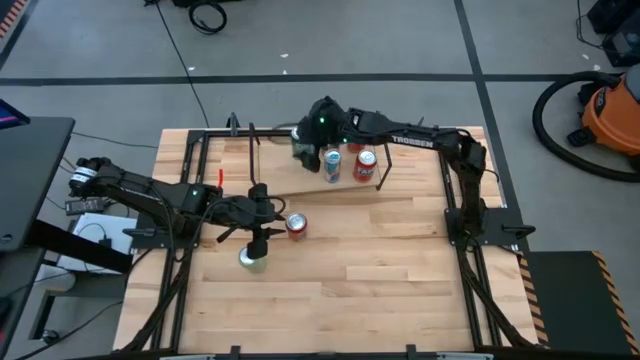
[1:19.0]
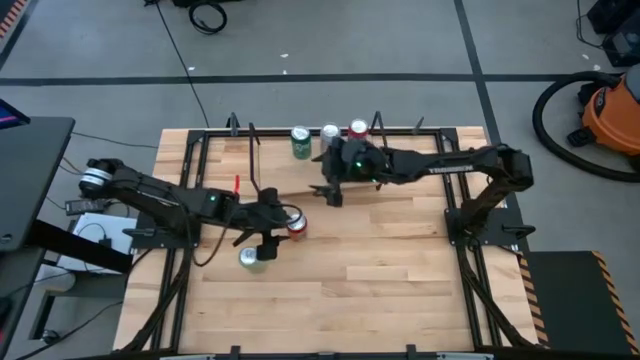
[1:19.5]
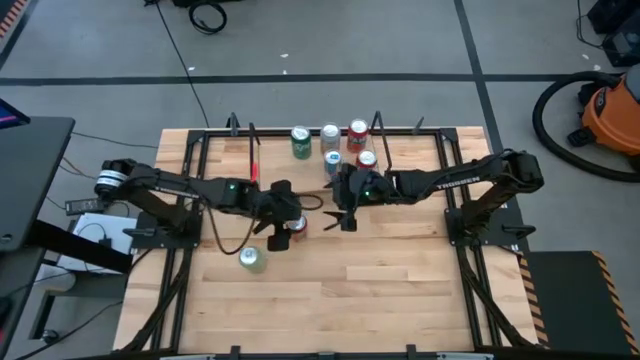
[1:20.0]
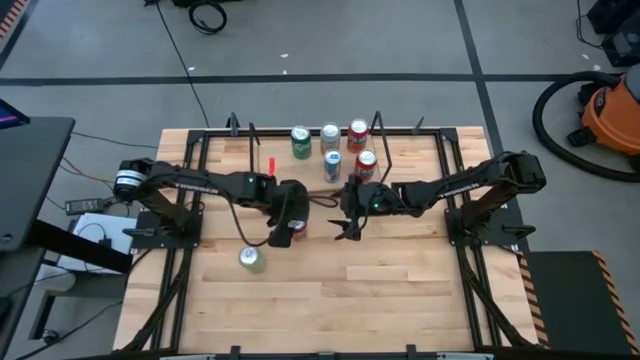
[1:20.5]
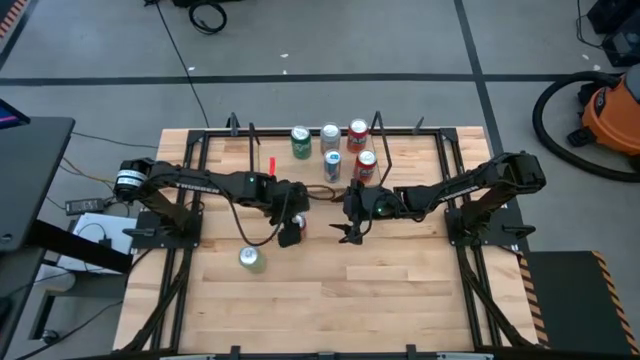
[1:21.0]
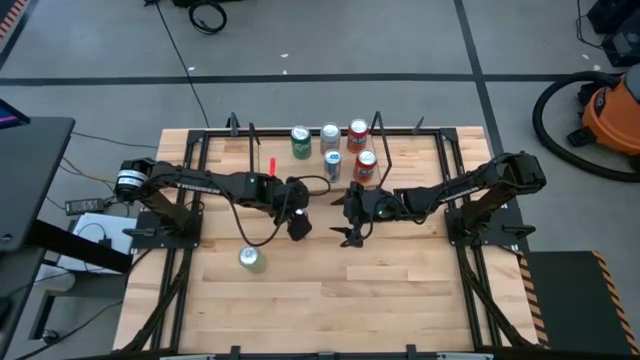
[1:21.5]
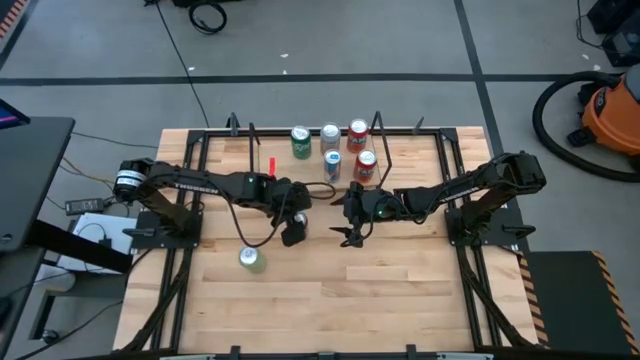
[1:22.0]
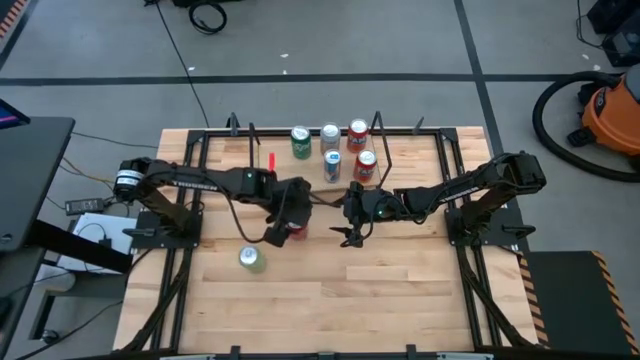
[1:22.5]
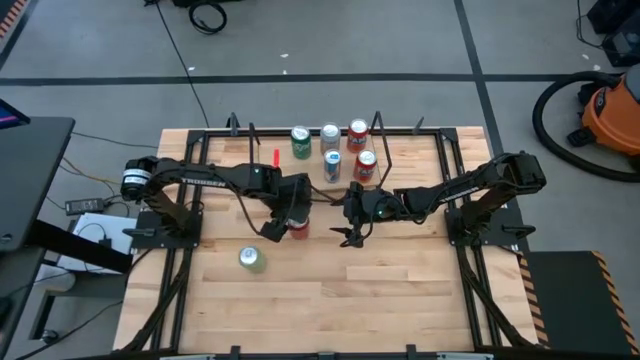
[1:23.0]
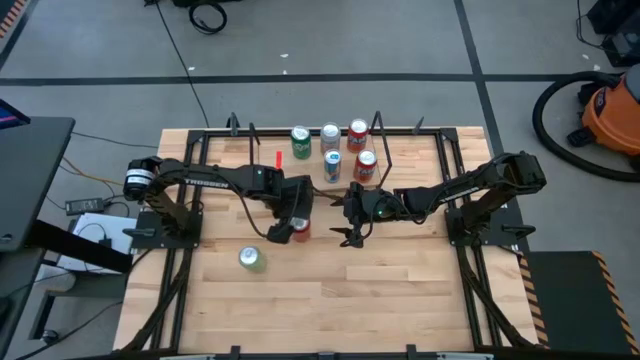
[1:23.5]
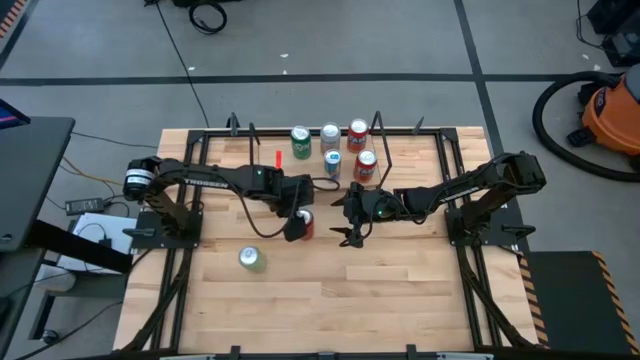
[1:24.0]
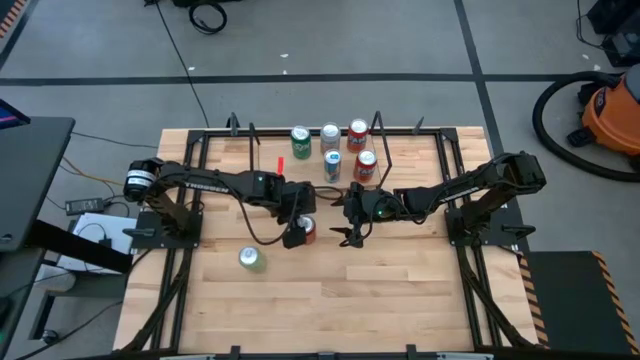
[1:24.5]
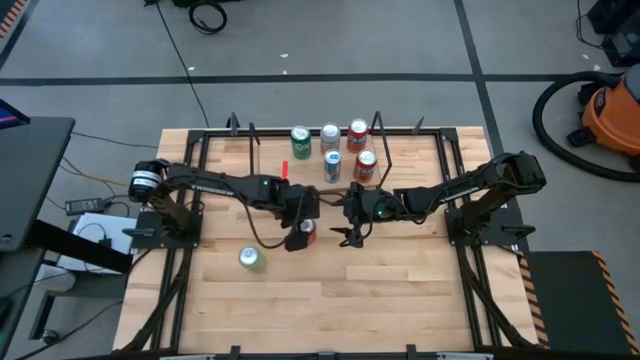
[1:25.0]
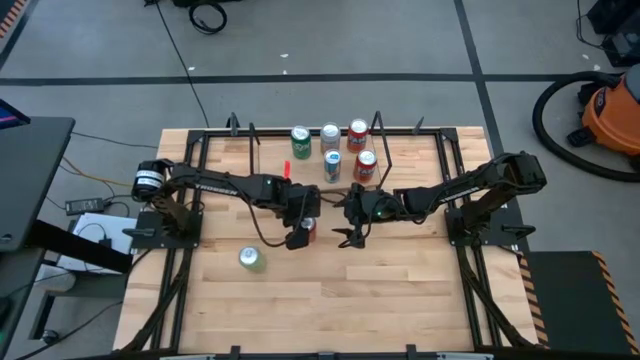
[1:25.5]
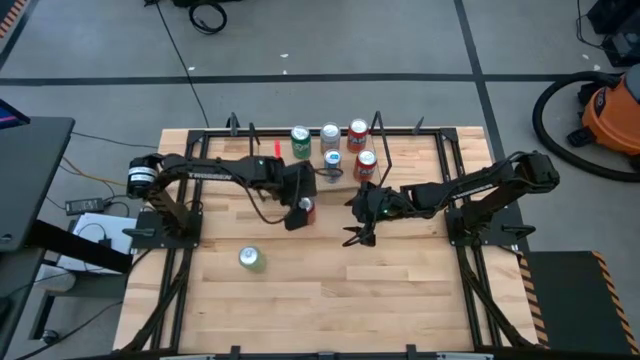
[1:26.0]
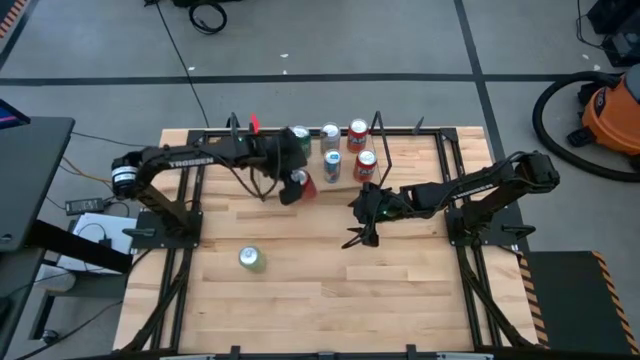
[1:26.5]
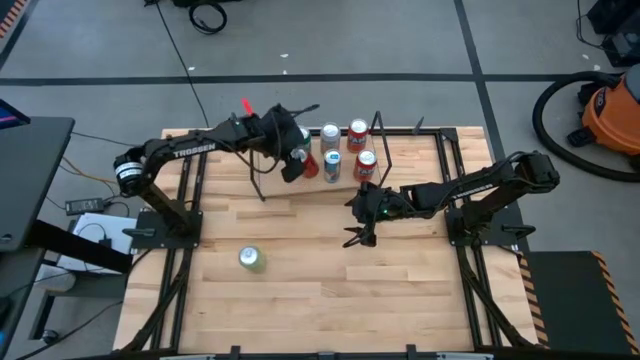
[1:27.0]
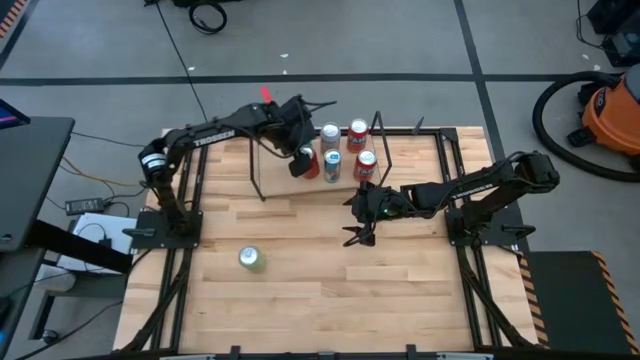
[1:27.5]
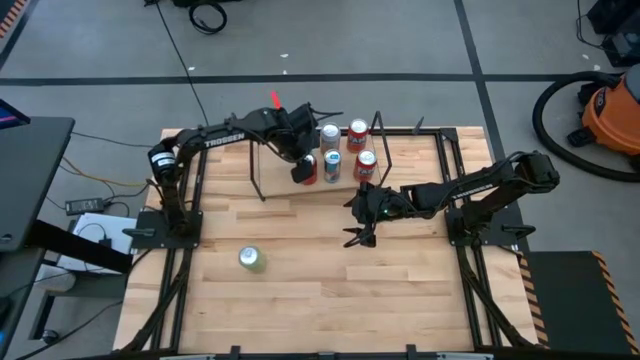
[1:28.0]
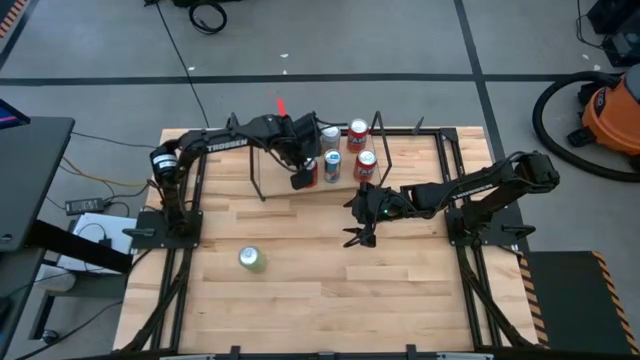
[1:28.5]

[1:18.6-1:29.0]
Task: Place canned beverage on shelf
Put the red-black soda can on the shelf aligned with the green soda can

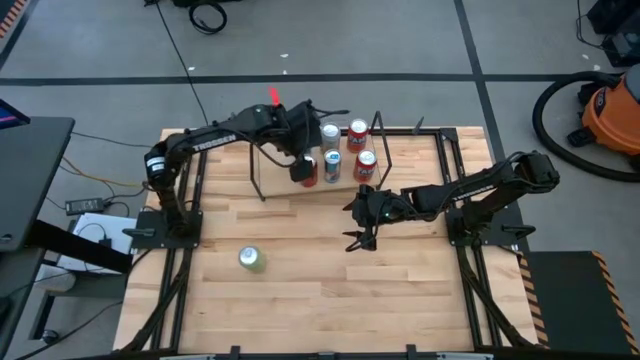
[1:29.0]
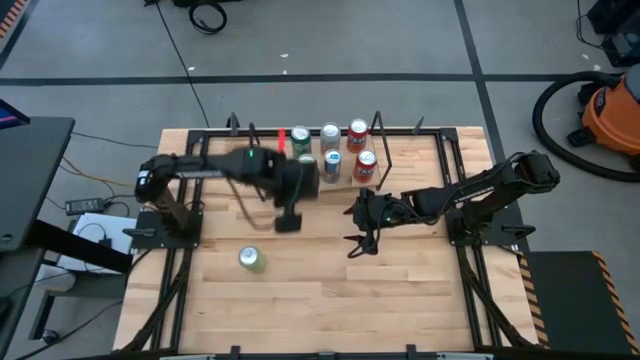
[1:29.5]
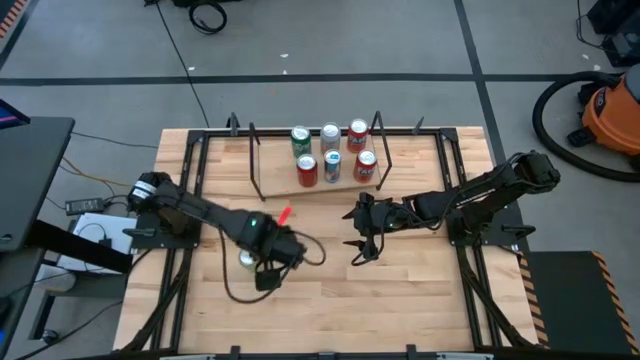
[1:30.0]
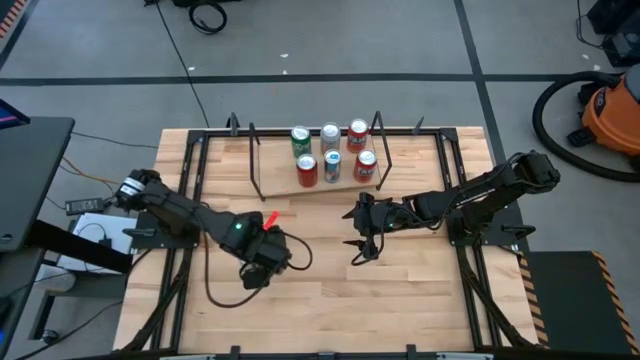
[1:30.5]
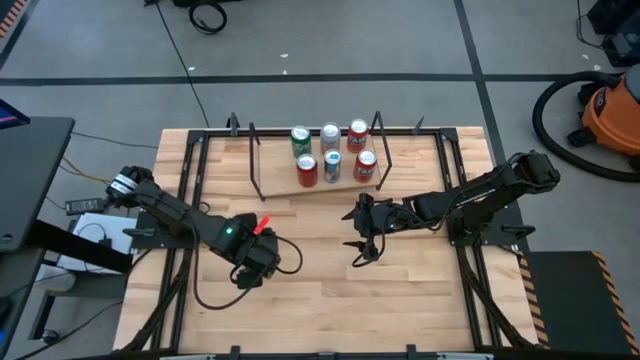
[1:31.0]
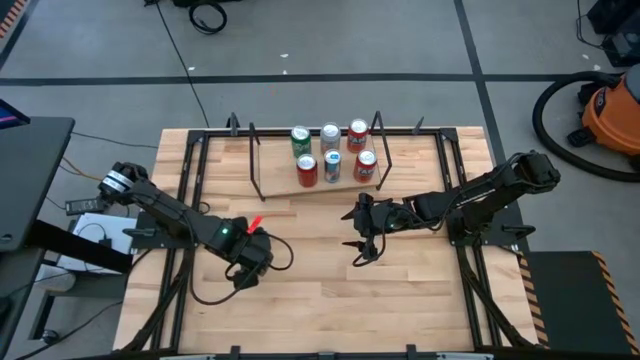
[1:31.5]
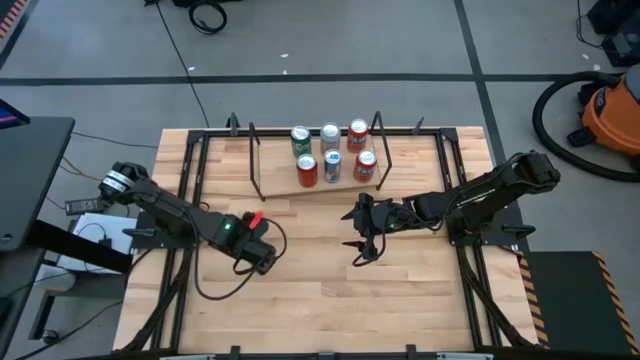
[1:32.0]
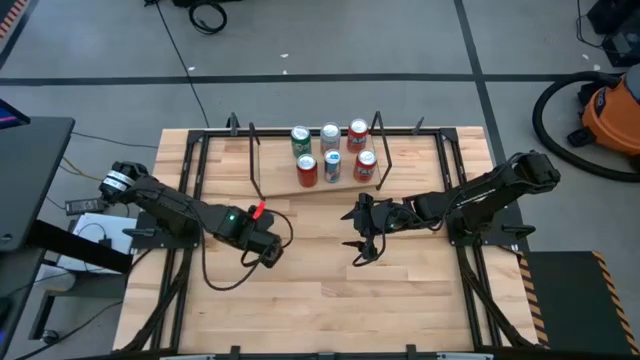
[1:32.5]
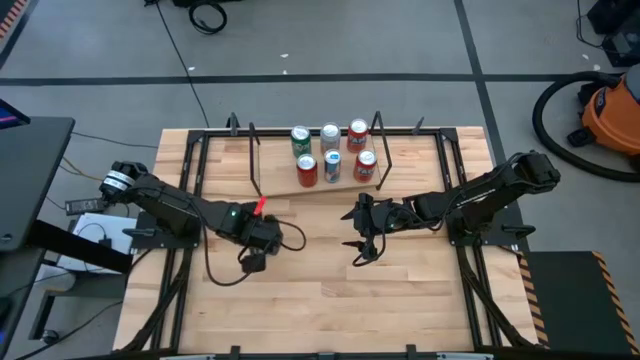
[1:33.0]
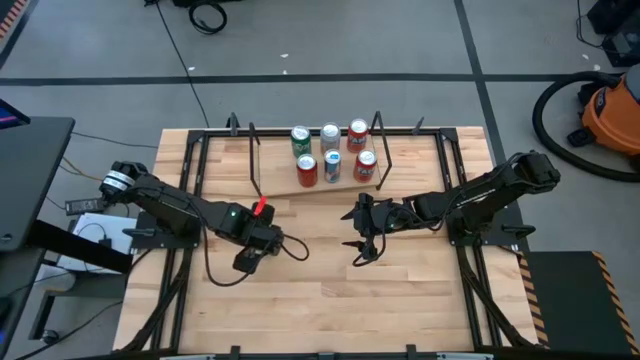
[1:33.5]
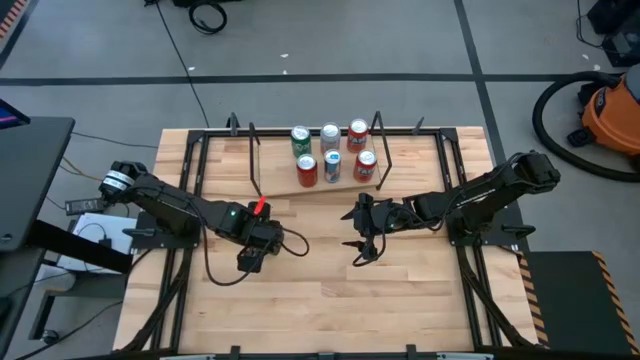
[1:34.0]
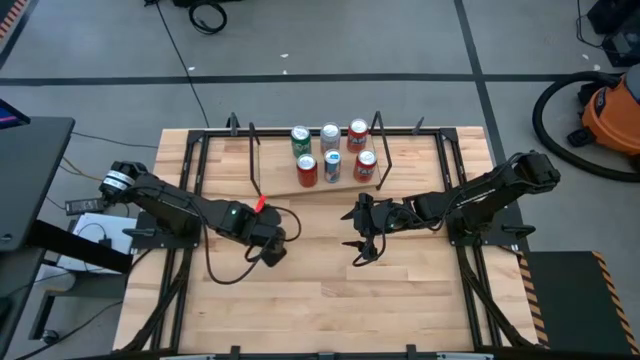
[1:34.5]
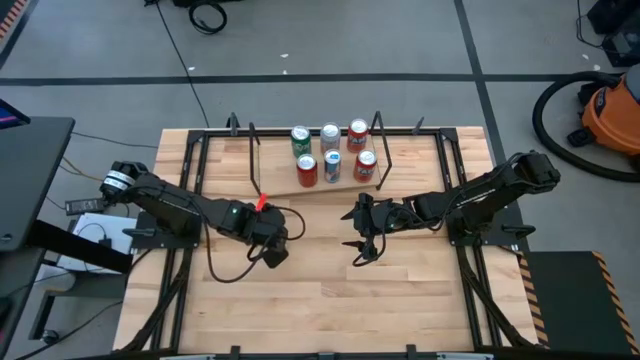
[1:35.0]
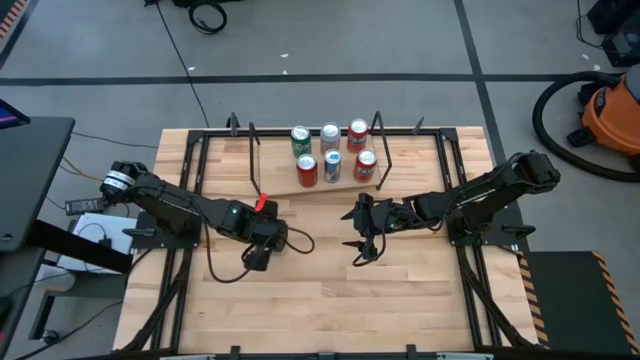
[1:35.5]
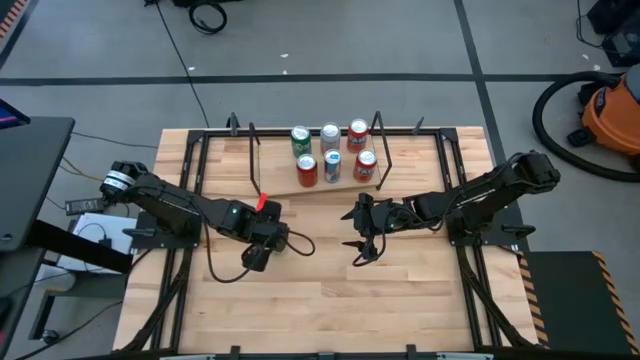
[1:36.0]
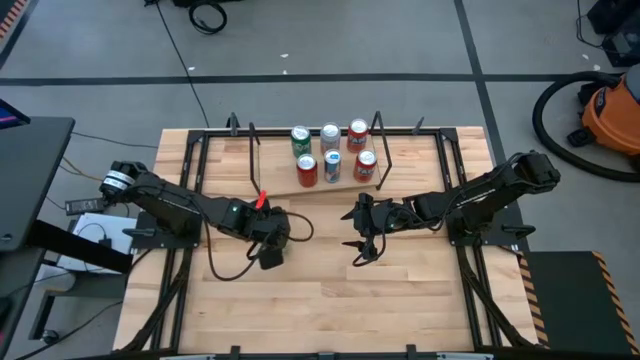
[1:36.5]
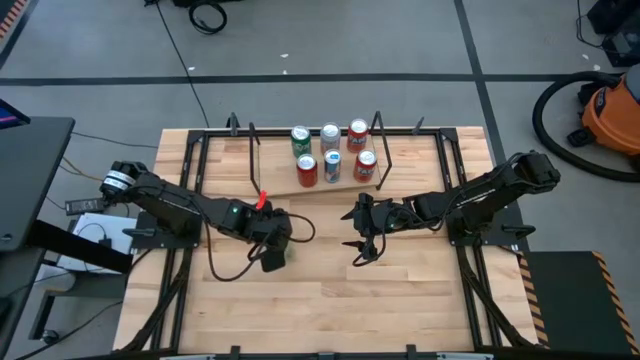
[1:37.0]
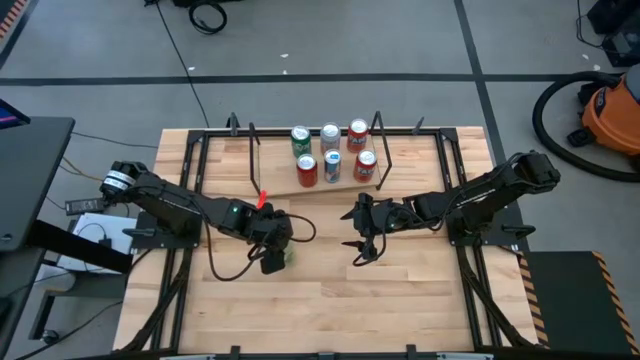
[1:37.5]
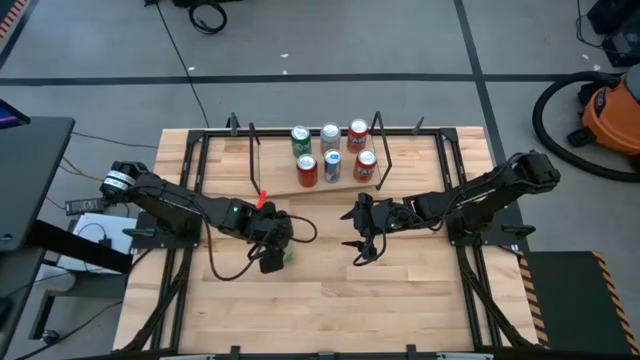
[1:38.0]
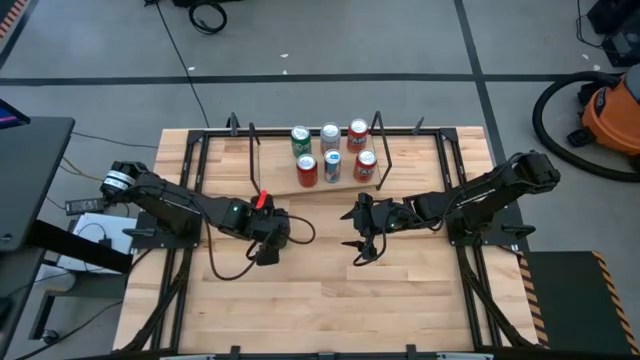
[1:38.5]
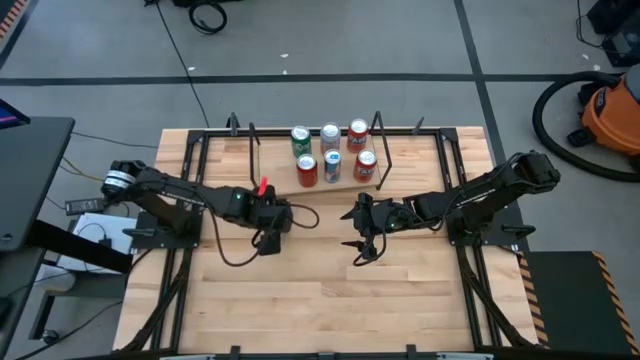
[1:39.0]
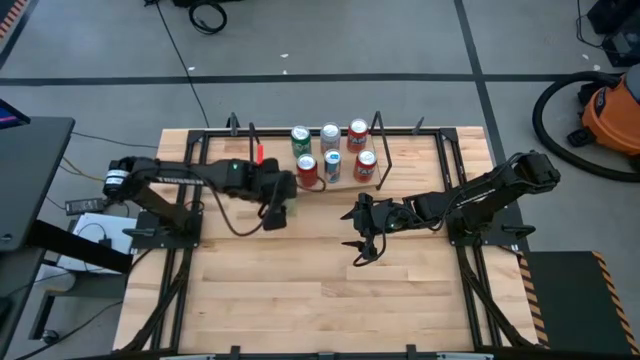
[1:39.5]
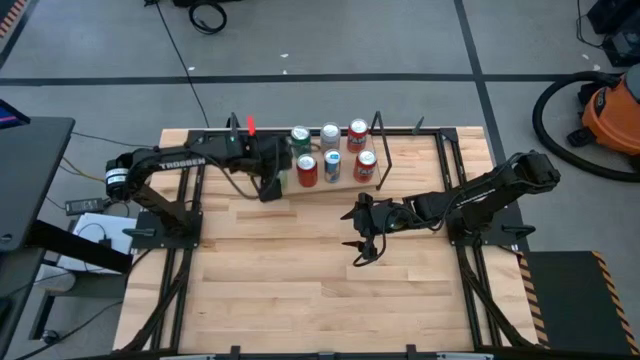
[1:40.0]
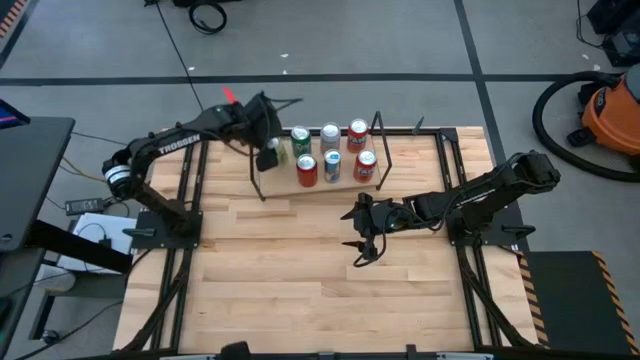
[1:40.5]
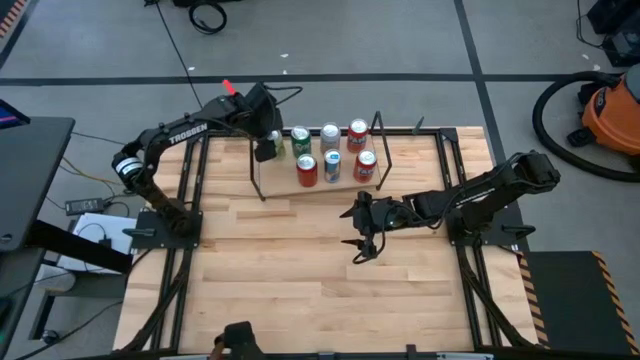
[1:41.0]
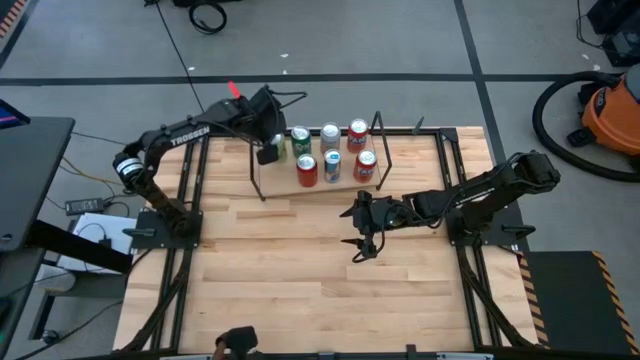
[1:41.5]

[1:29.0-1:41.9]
Put the light green soda can on the shelf
